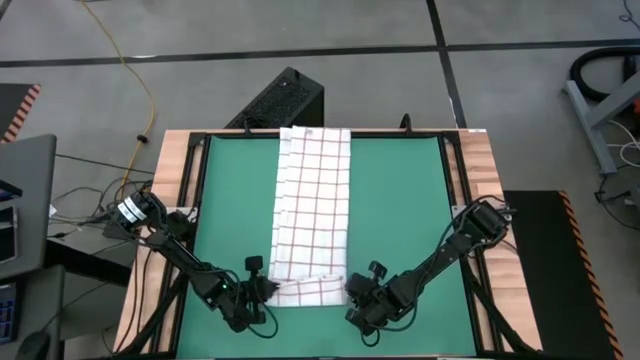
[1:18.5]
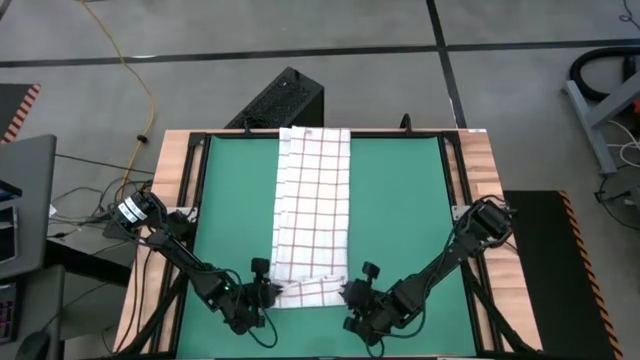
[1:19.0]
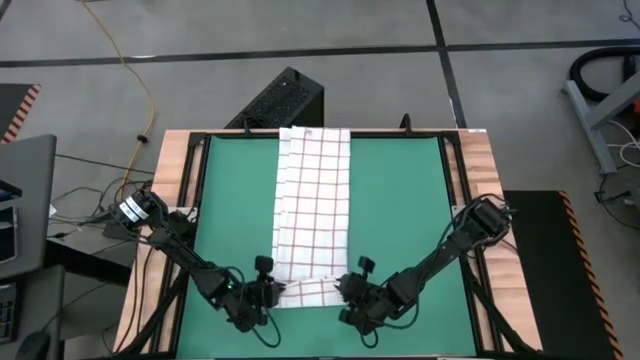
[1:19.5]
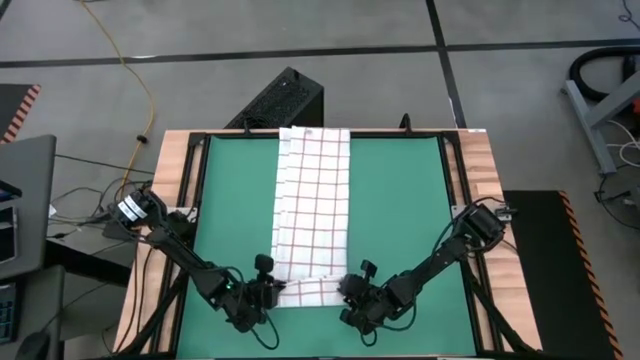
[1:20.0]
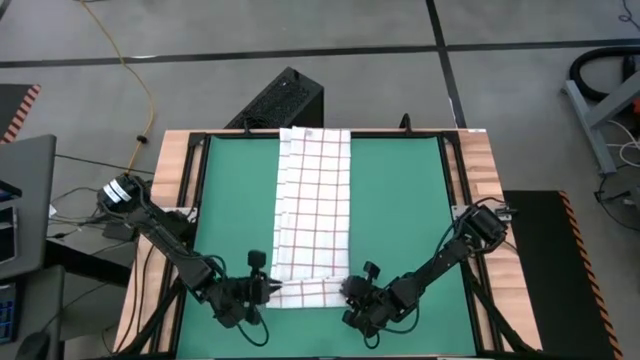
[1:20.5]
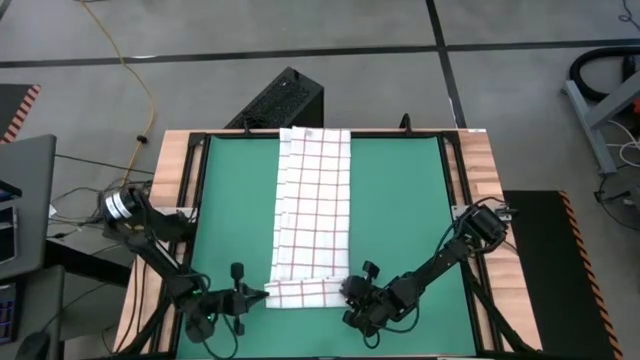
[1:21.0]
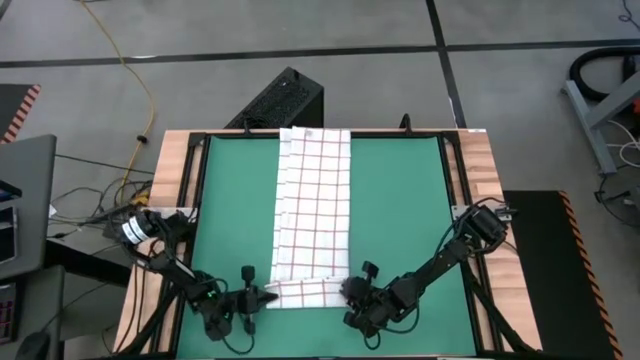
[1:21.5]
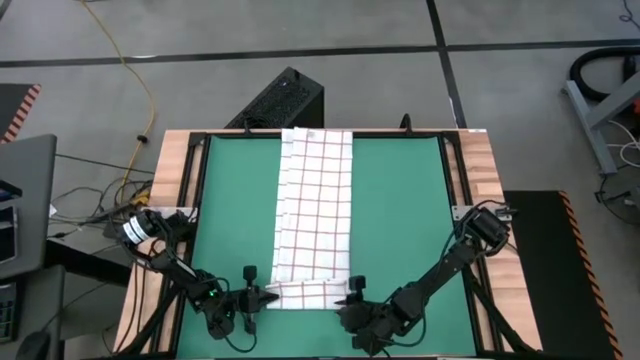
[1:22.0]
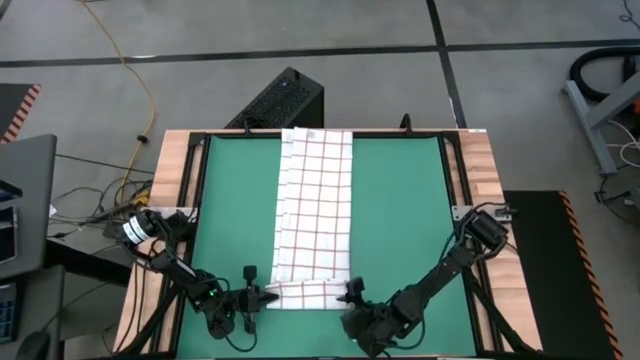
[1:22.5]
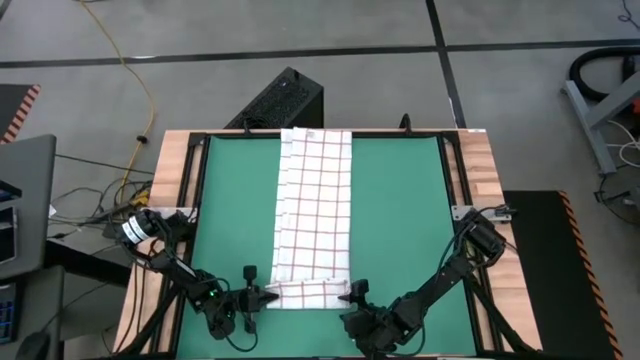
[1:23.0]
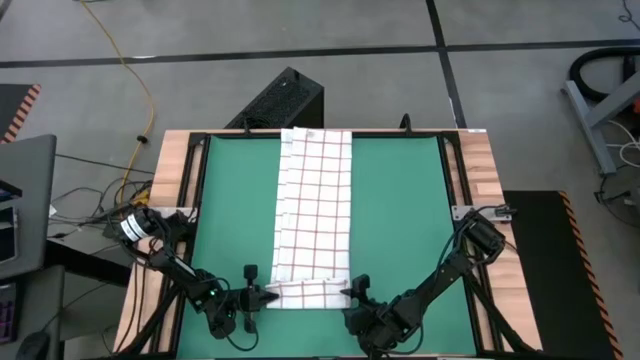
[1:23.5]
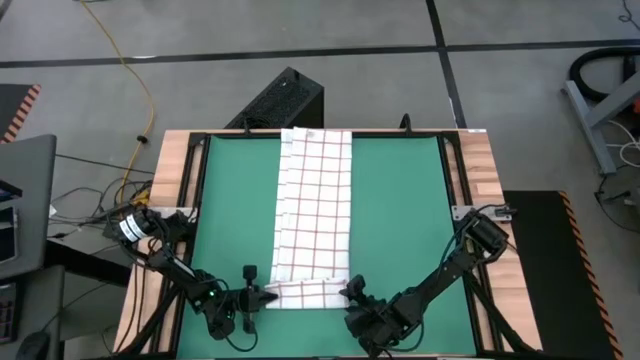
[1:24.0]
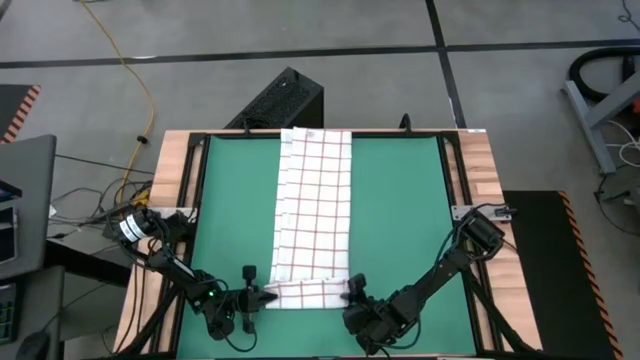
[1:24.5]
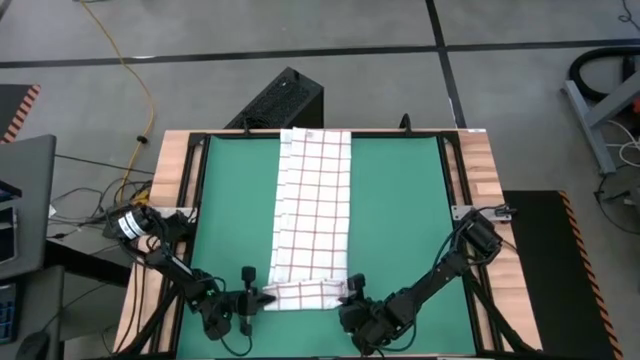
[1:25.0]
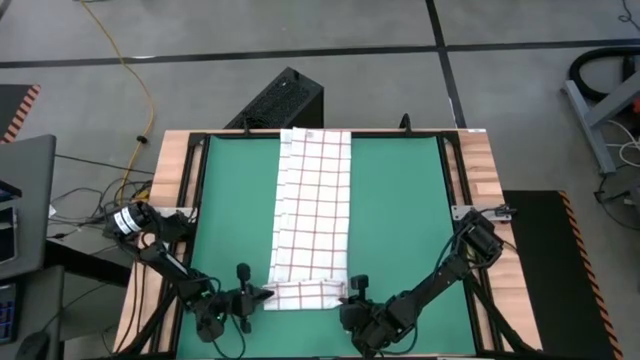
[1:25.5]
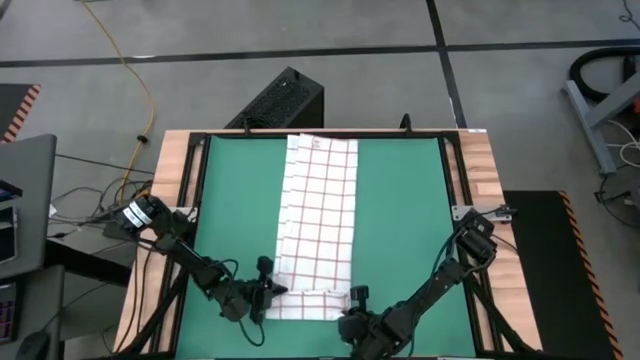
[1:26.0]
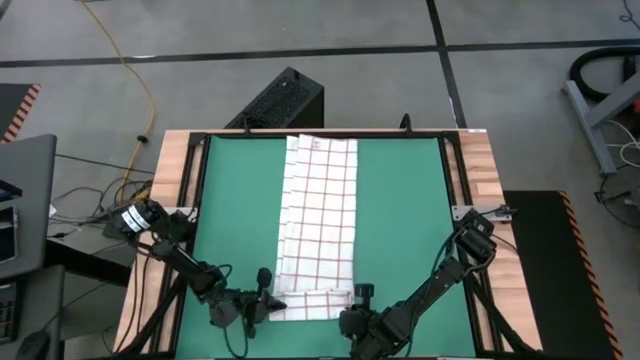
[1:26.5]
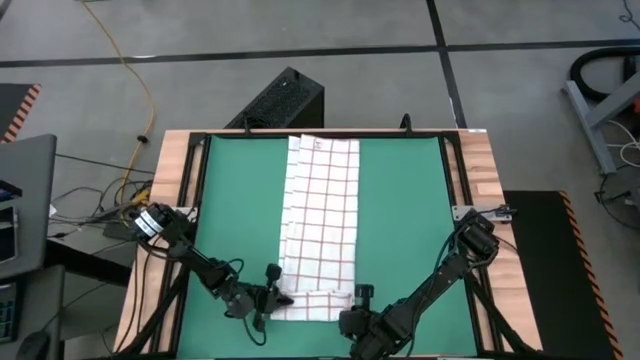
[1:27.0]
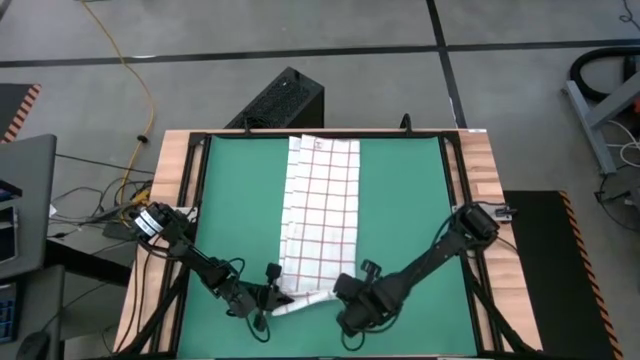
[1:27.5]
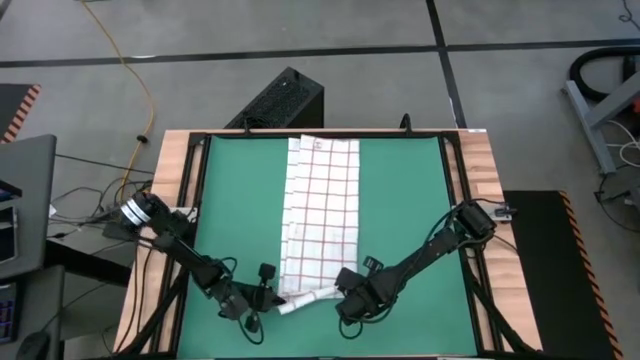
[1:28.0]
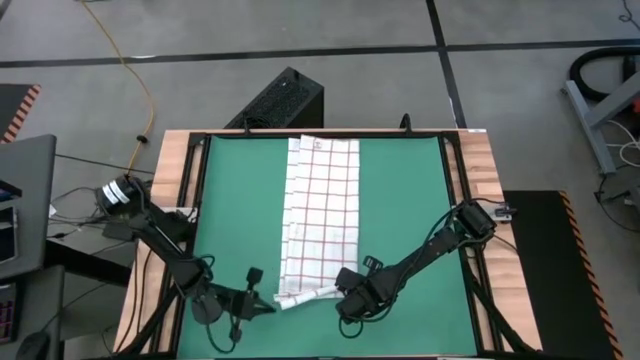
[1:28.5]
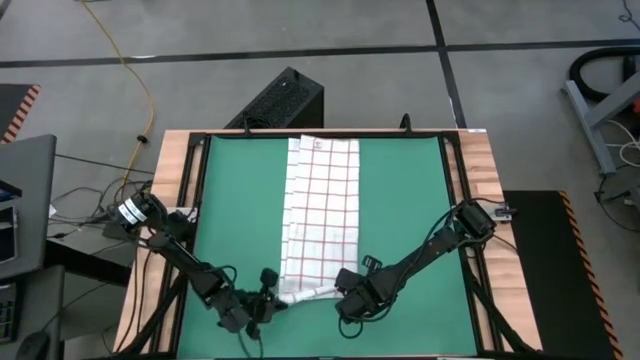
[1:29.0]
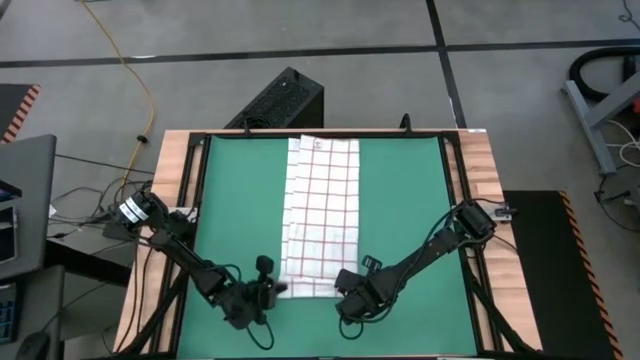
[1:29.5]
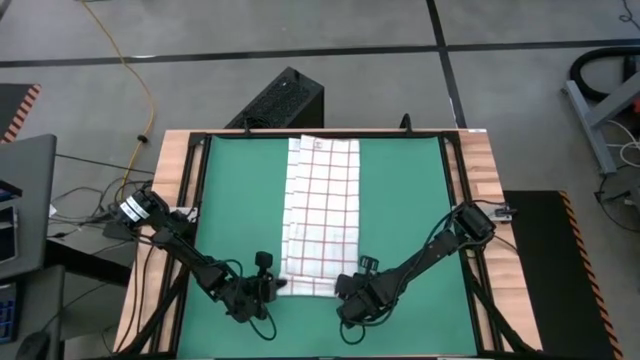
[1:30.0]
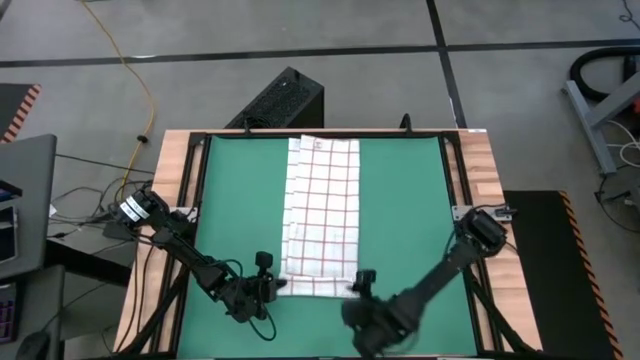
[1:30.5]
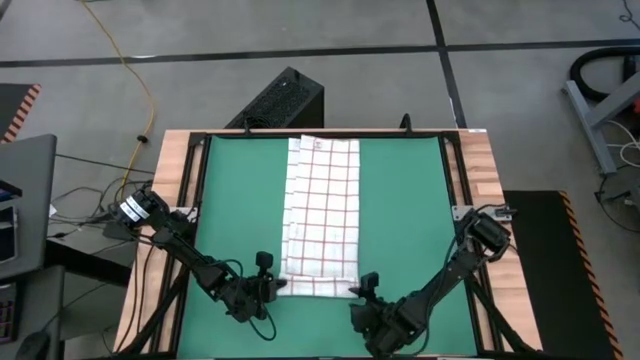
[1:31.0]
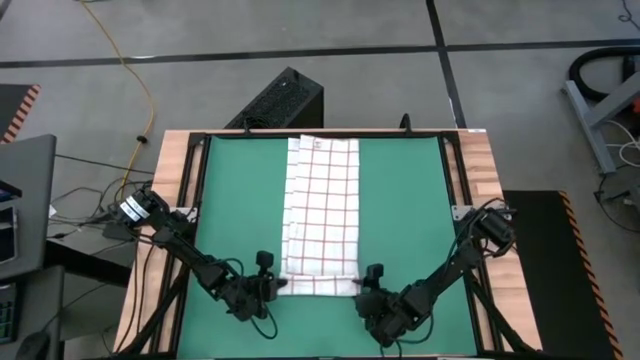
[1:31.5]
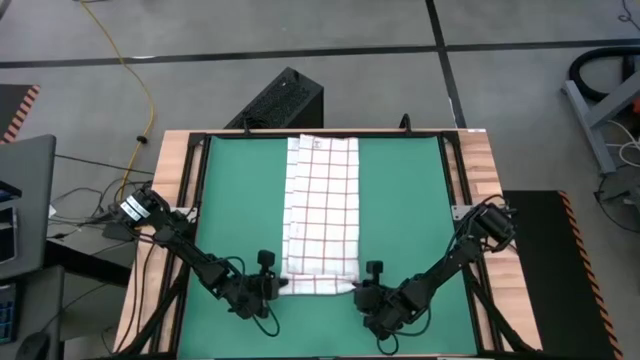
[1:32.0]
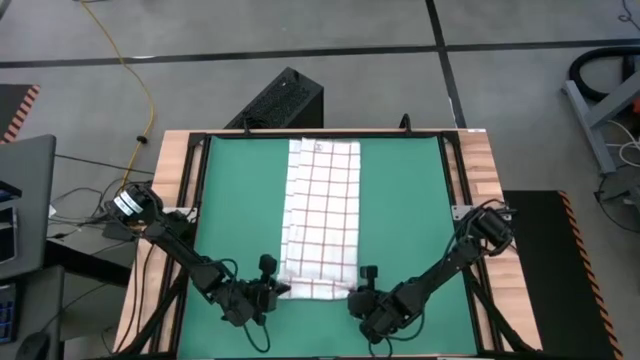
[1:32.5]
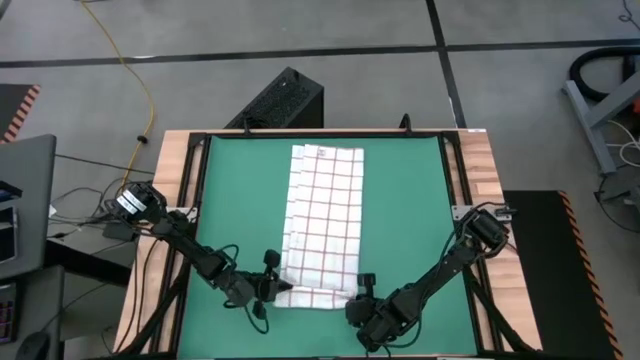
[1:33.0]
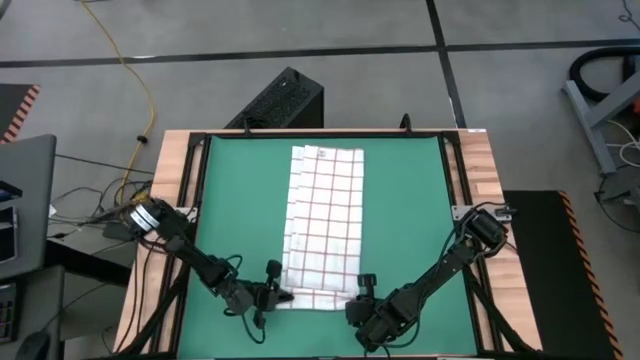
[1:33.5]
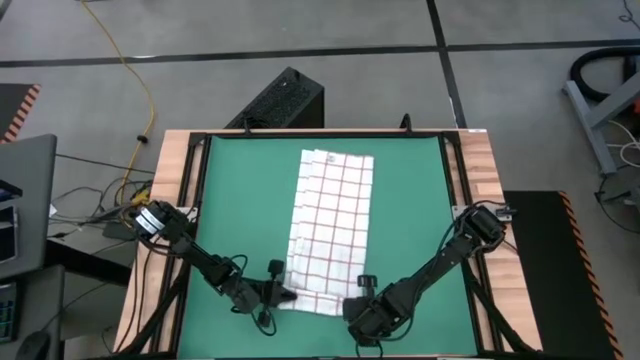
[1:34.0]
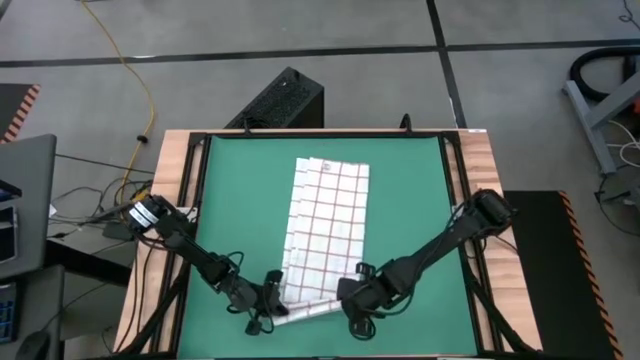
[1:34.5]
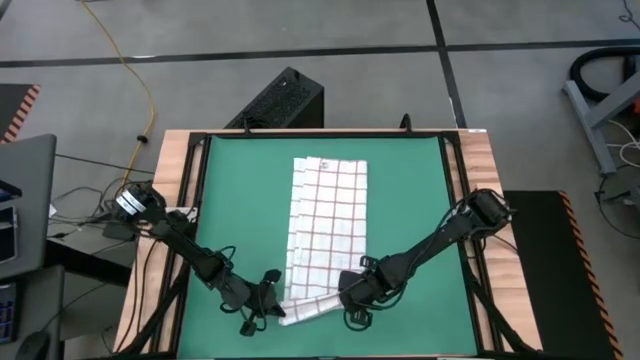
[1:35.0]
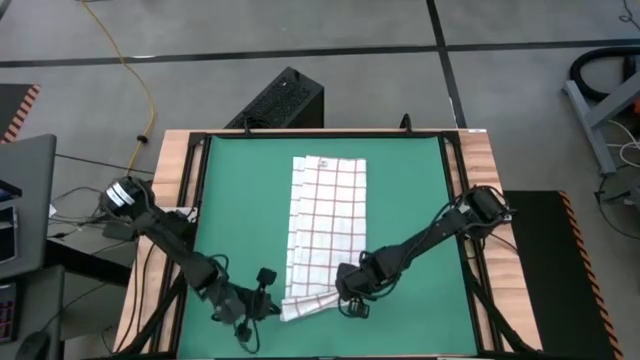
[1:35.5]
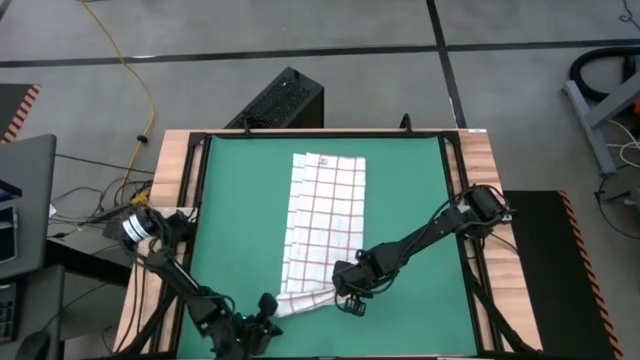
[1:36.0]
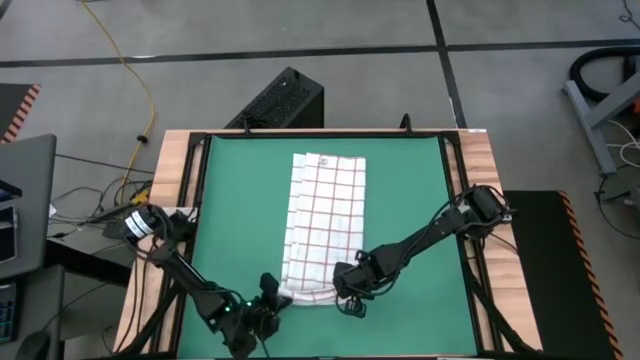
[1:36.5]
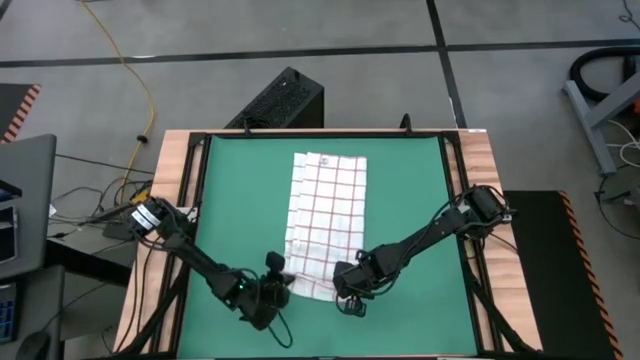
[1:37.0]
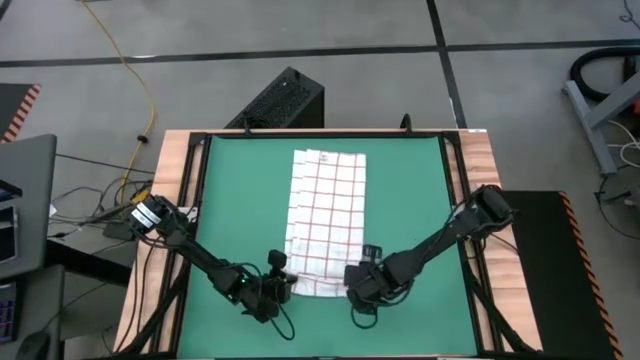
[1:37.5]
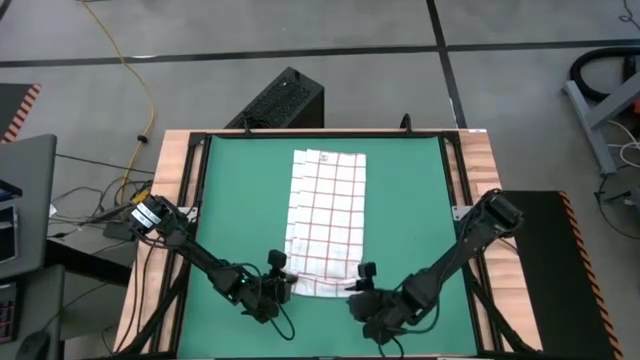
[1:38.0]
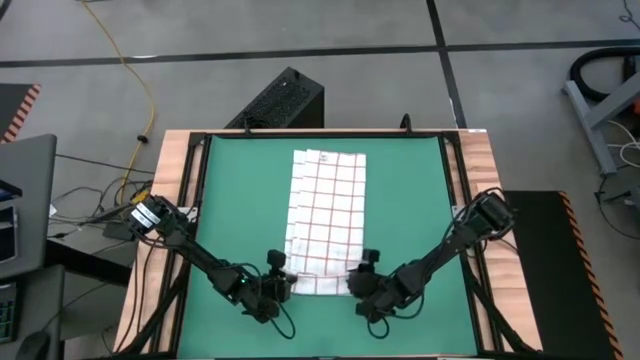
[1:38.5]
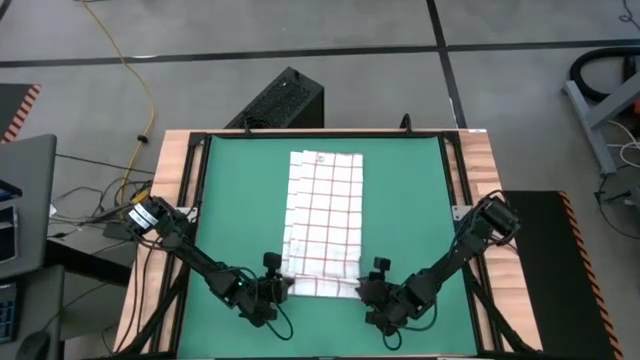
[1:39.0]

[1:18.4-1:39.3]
Task: Roll towel
Roll the white towel
